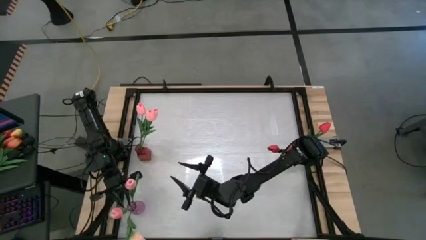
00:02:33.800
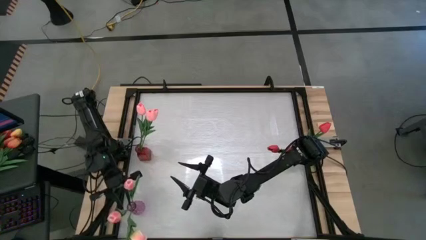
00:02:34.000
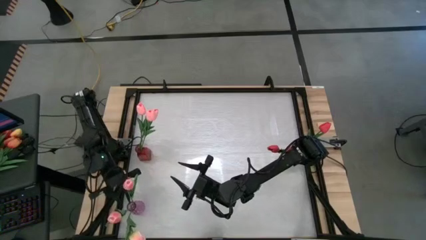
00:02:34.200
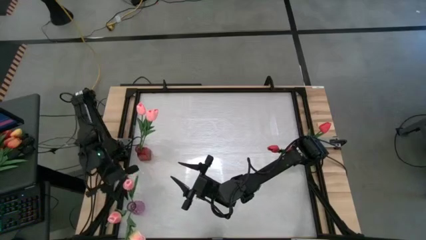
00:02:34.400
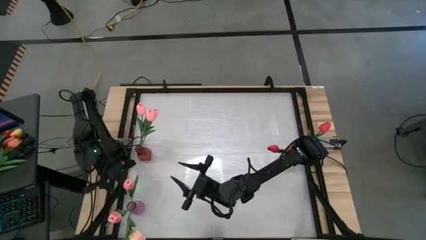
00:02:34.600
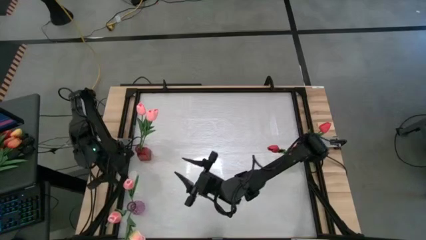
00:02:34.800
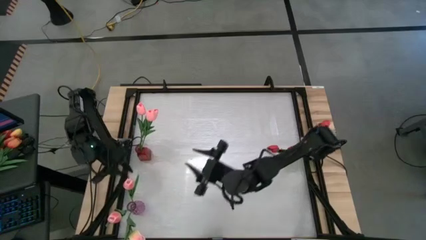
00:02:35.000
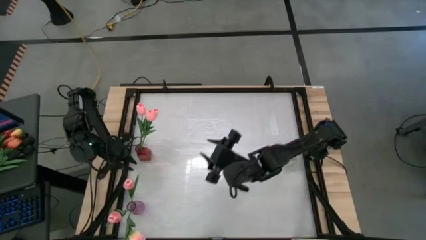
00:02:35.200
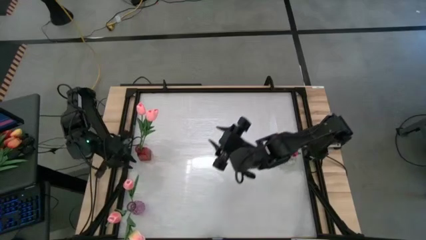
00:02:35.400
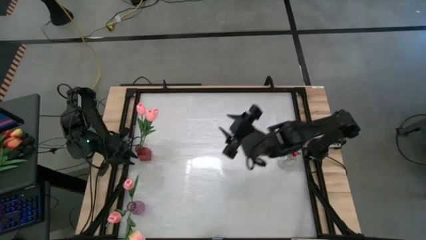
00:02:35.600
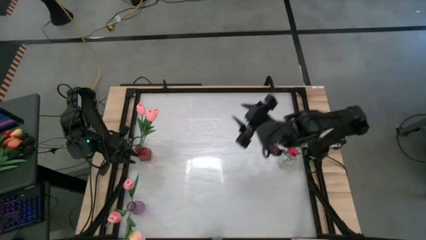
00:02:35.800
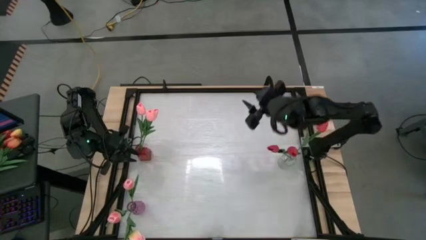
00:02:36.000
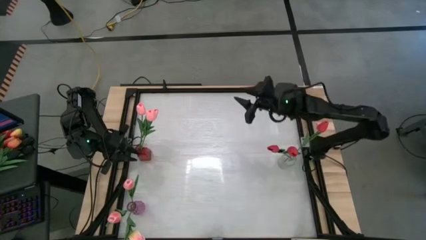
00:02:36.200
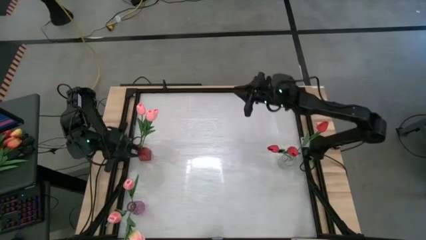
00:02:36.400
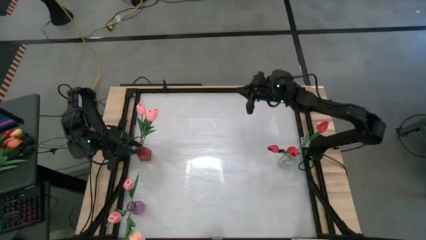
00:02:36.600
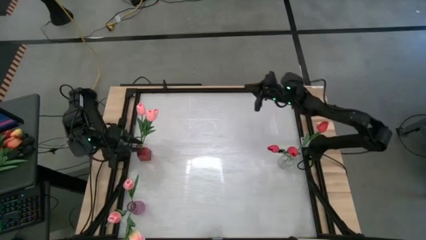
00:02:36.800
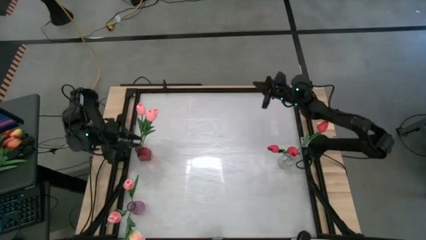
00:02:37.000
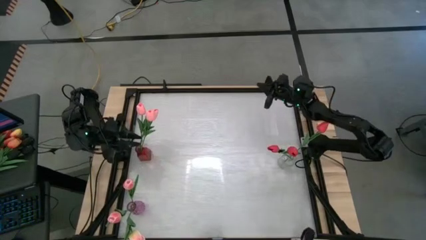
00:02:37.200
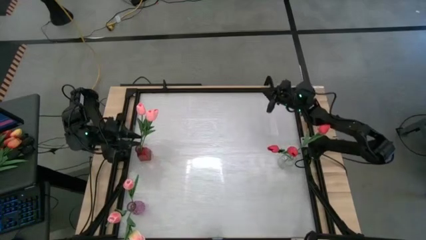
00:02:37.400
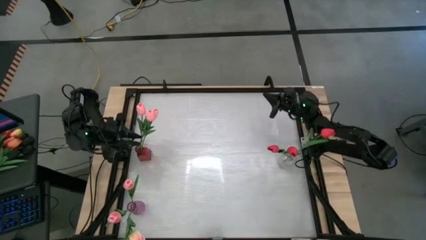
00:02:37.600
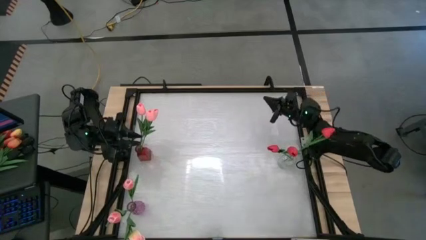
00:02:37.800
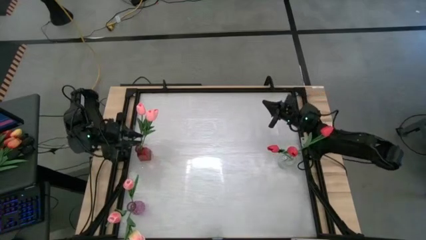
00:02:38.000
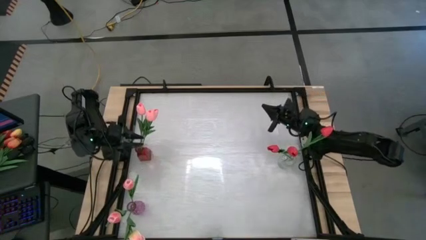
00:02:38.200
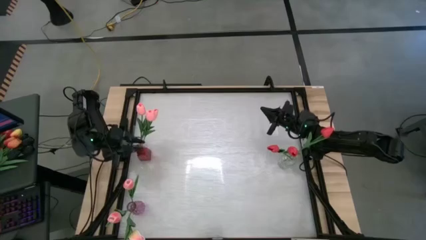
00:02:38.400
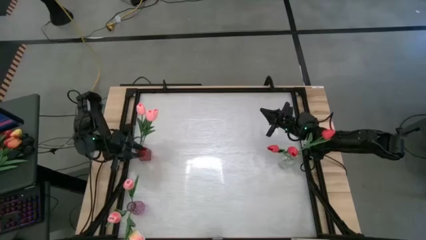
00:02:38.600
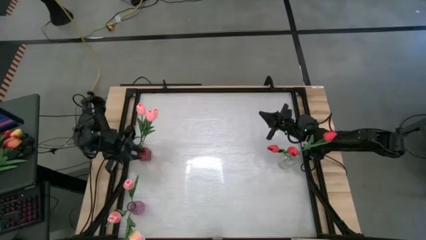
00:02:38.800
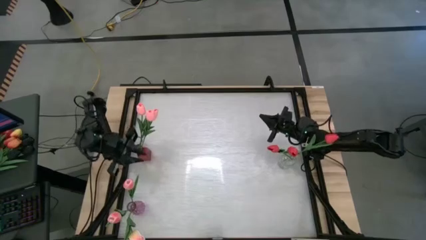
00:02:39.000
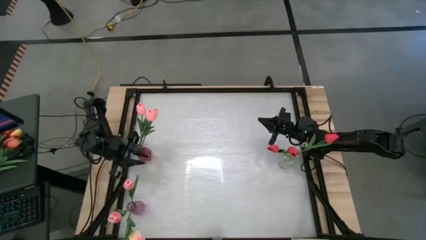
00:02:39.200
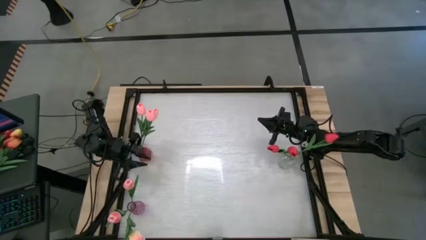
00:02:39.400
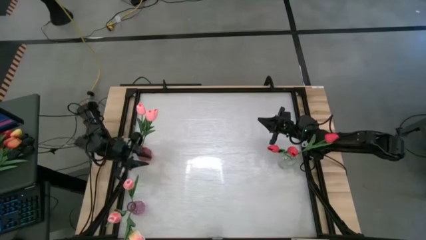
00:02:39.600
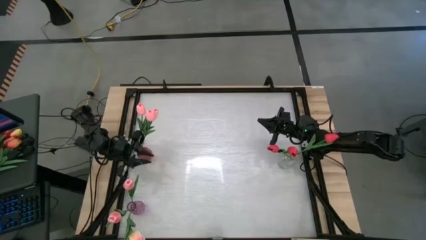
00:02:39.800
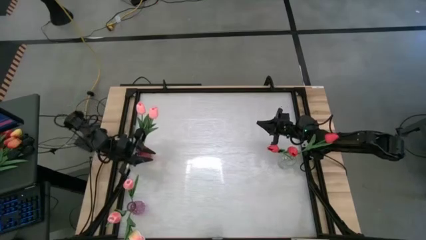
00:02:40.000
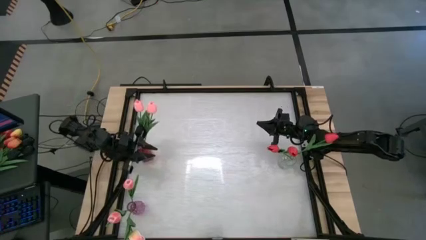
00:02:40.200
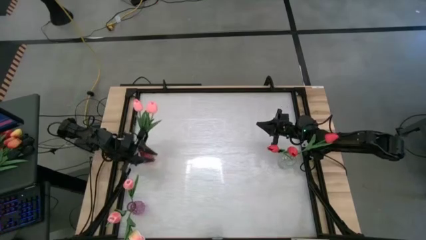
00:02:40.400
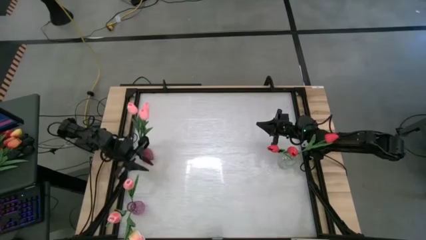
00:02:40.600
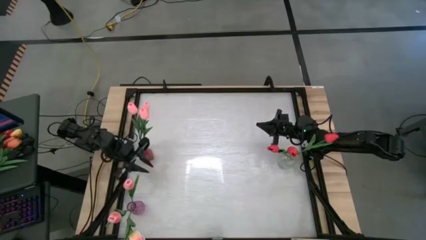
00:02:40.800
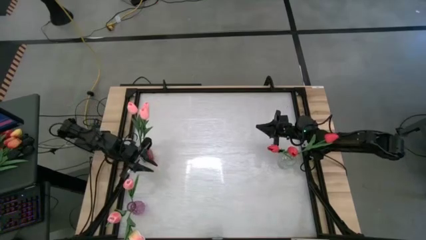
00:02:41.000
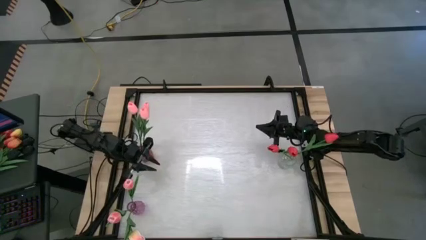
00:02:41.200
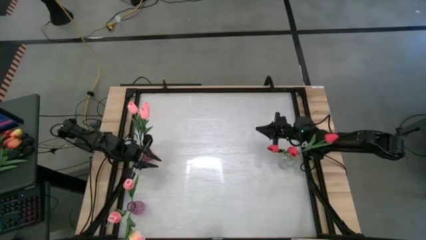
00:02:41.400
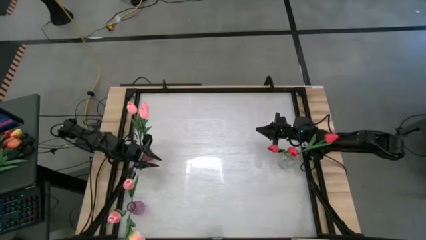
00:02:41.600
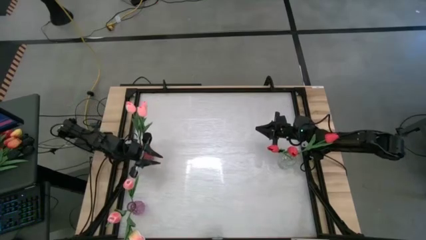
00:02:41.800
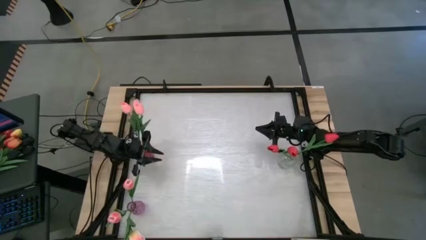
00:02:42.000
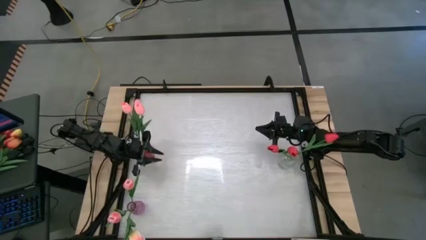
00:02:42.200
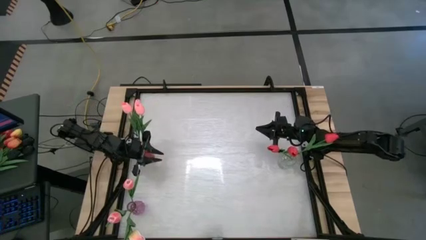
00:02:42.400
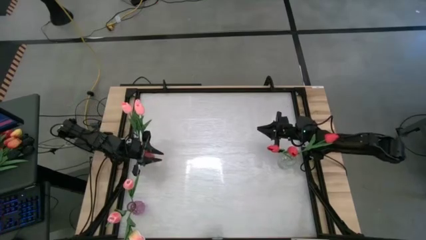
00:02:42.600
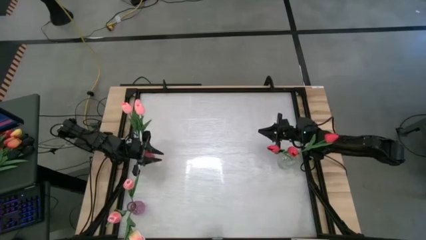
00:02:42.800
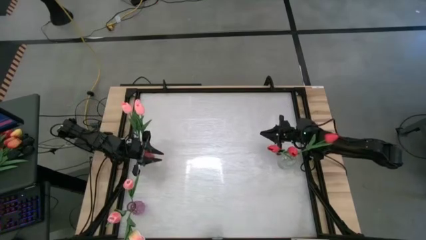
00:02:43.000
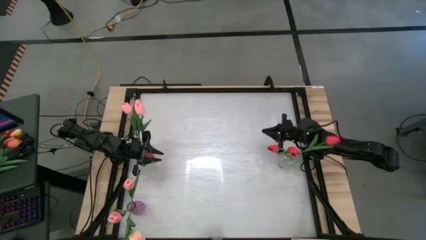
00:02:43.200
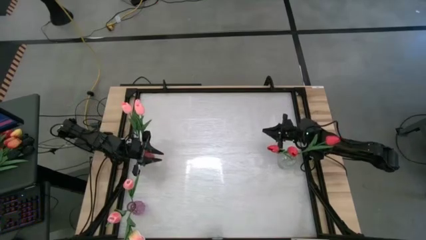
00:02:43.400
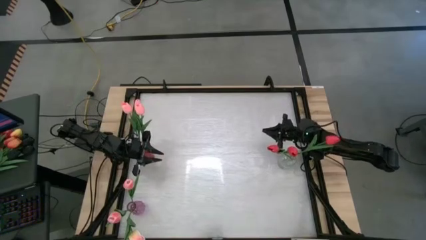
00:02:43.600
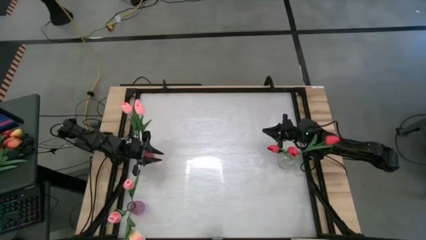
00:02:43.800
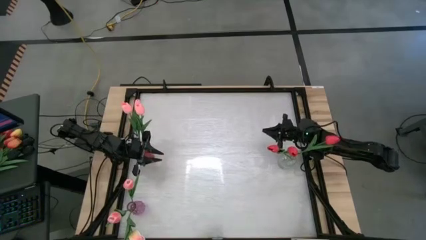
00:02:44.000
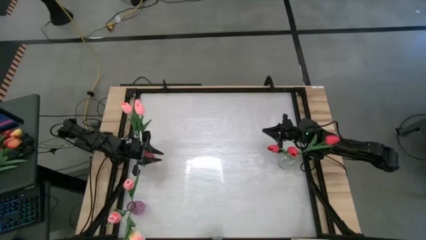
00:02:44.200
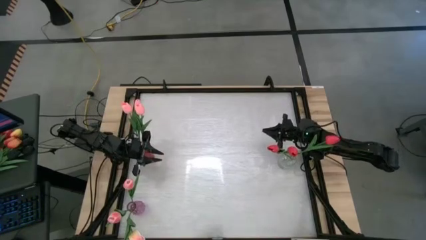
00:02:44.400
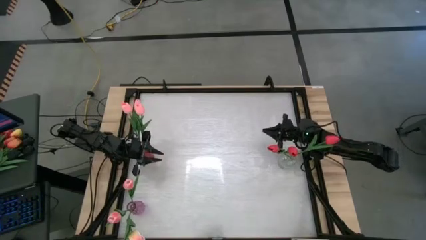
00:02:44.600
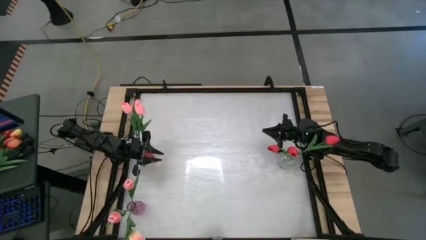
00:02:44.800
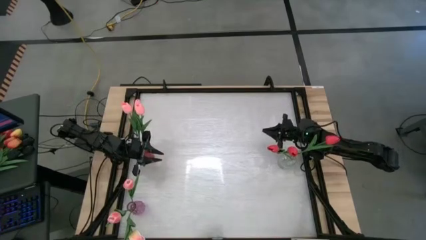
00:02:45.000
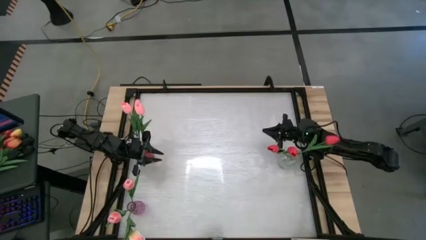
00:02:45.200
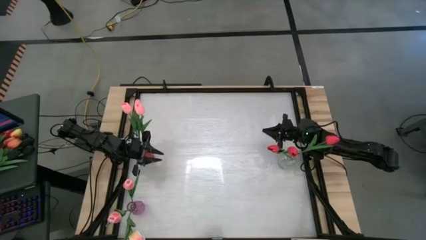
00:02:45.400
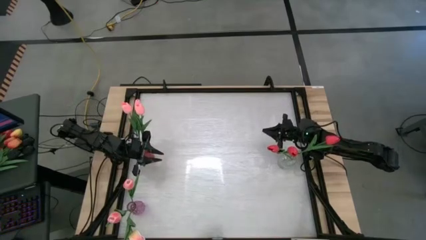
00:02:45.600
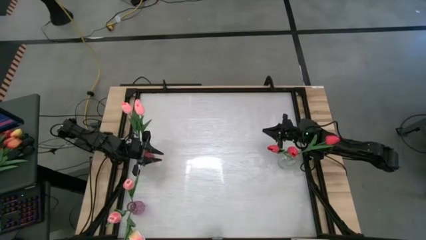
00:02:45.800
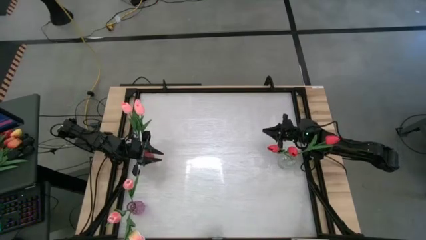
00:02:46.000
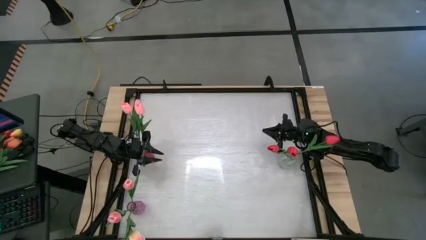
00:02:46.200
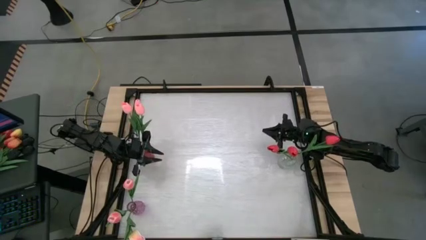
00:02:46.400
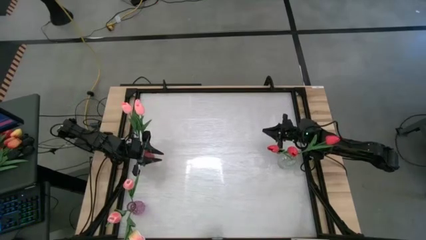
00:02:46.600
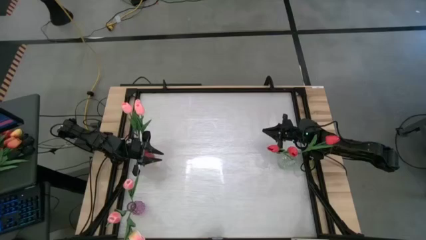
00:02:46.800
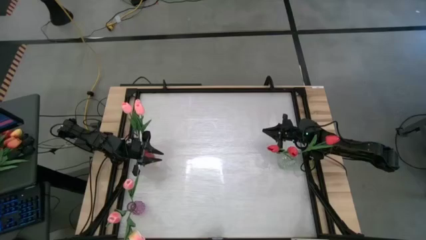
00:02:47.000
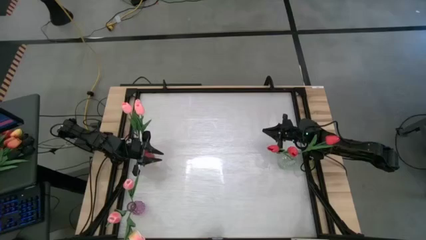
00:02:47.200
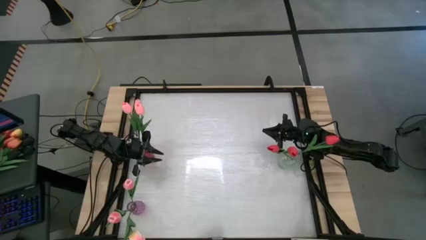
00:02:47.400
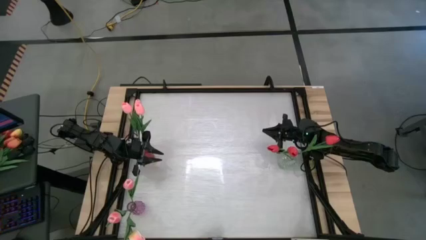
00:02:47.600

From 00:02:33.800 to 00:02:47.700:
Task: Sort flowers into vase by color
Return to Home Position
